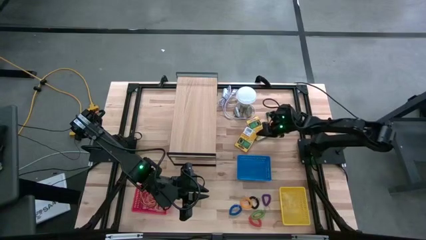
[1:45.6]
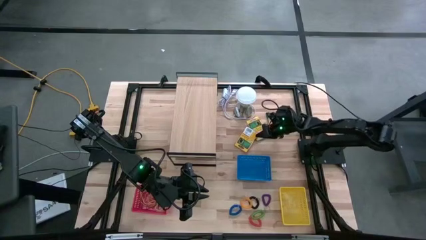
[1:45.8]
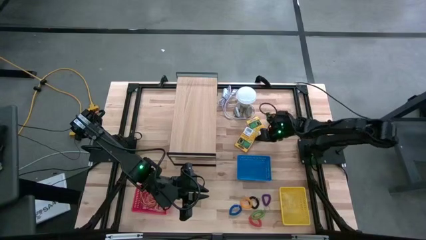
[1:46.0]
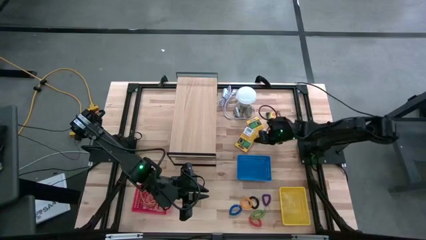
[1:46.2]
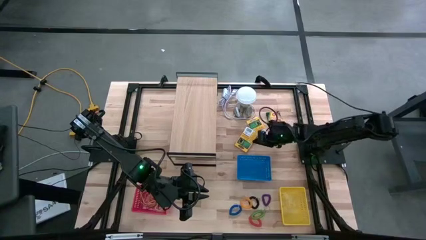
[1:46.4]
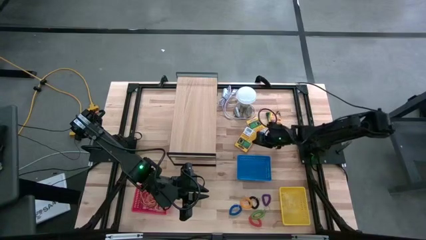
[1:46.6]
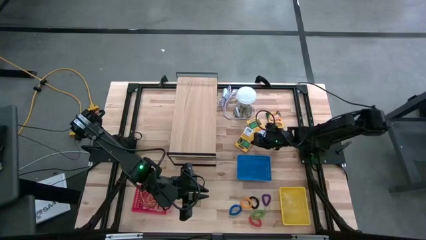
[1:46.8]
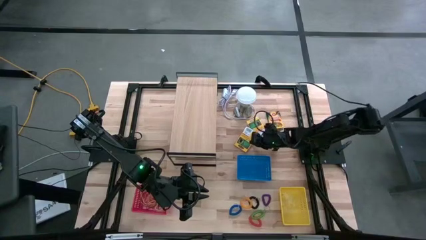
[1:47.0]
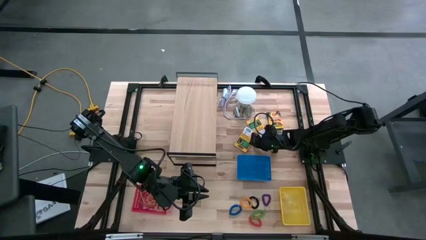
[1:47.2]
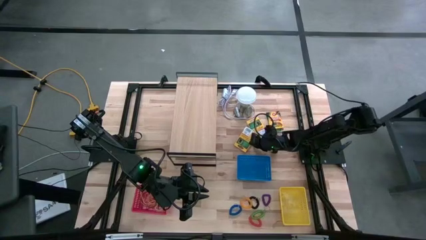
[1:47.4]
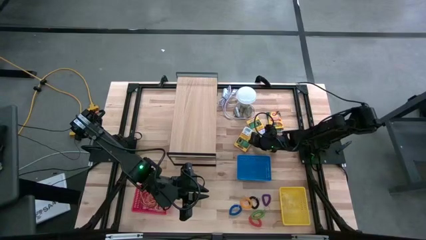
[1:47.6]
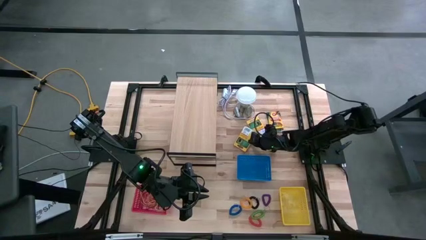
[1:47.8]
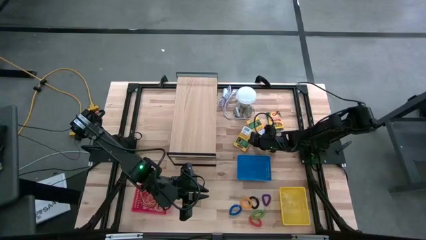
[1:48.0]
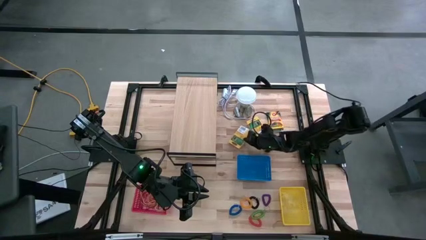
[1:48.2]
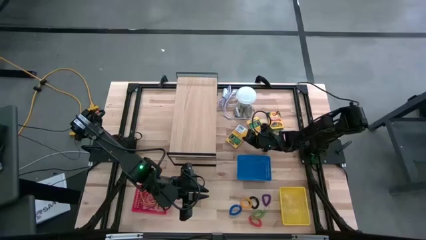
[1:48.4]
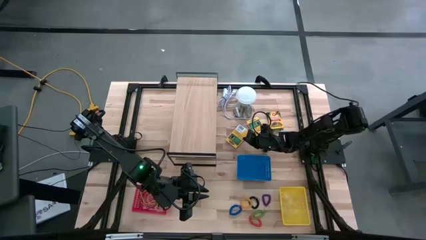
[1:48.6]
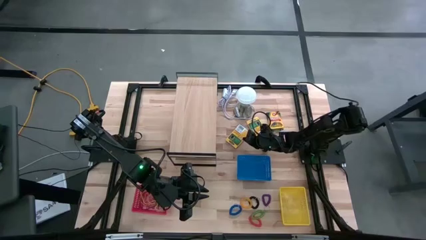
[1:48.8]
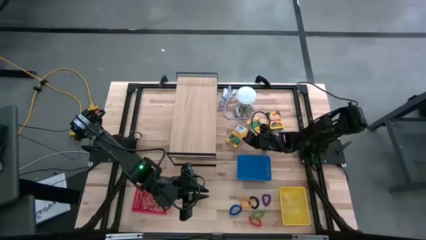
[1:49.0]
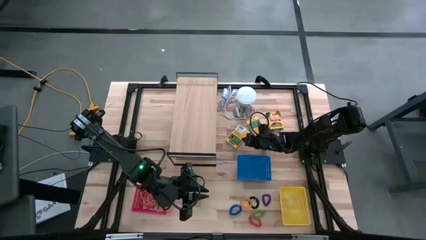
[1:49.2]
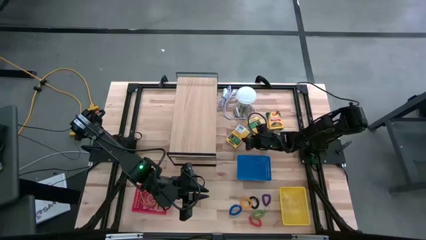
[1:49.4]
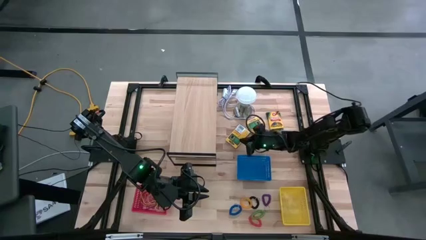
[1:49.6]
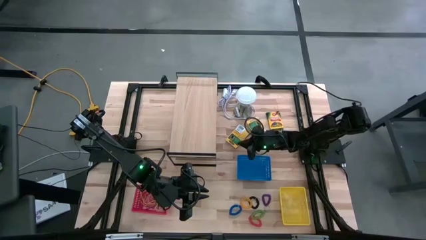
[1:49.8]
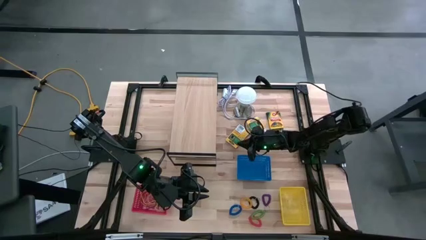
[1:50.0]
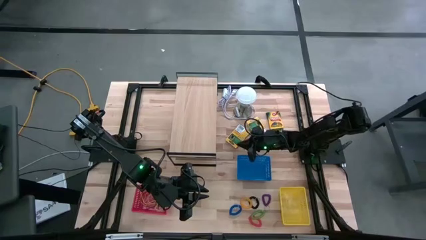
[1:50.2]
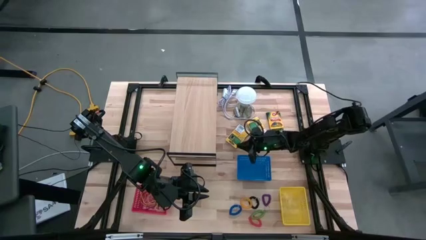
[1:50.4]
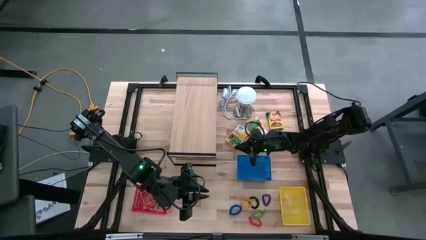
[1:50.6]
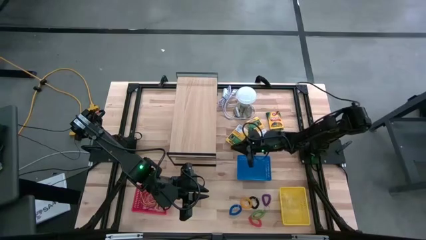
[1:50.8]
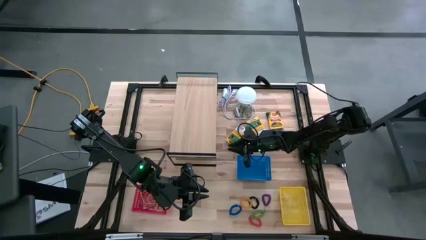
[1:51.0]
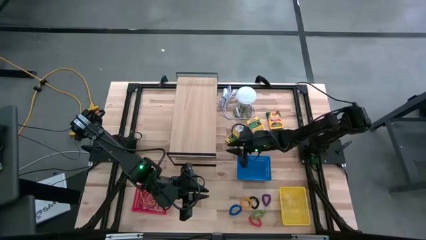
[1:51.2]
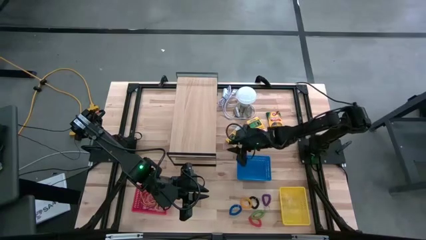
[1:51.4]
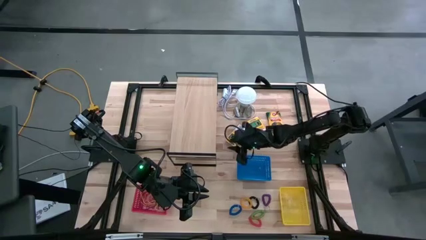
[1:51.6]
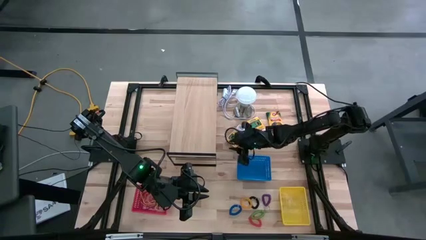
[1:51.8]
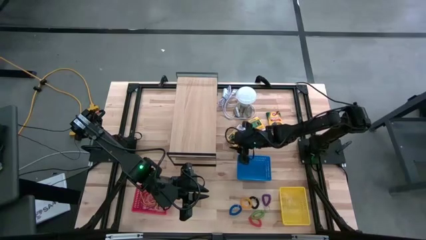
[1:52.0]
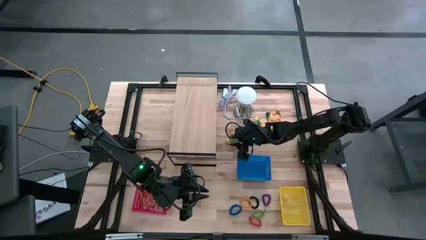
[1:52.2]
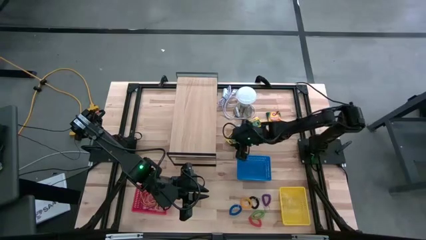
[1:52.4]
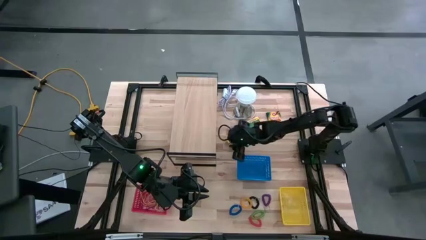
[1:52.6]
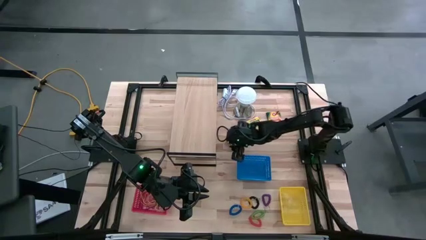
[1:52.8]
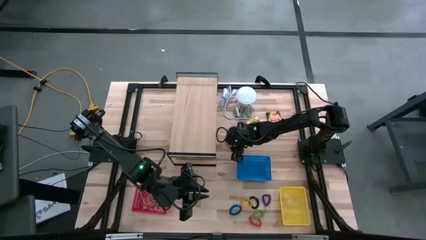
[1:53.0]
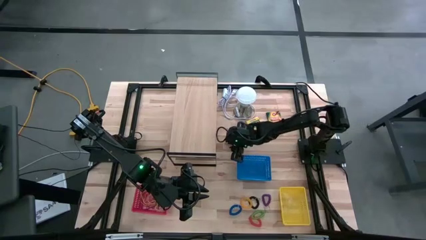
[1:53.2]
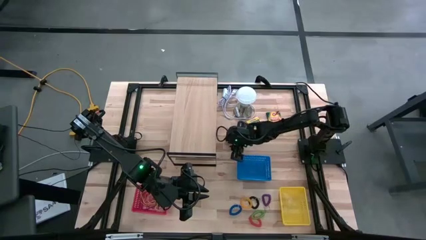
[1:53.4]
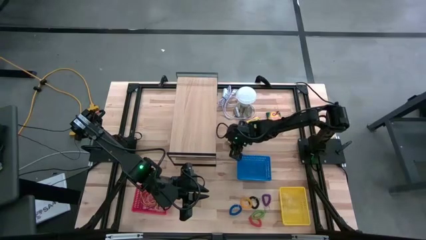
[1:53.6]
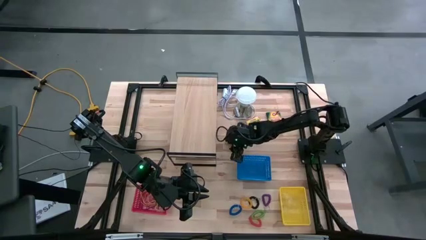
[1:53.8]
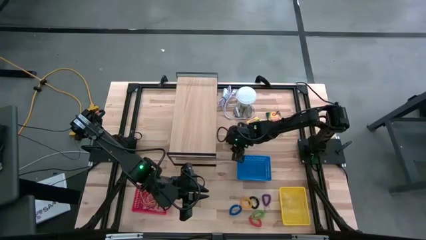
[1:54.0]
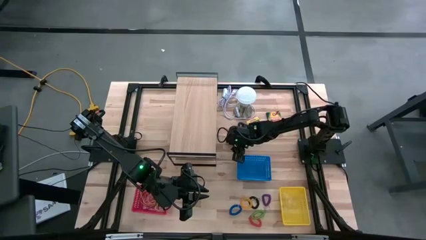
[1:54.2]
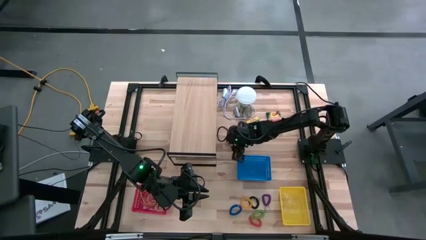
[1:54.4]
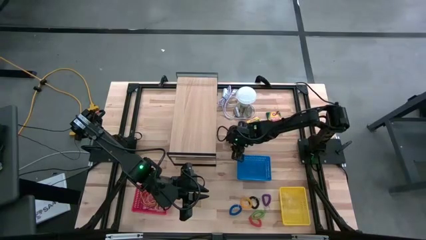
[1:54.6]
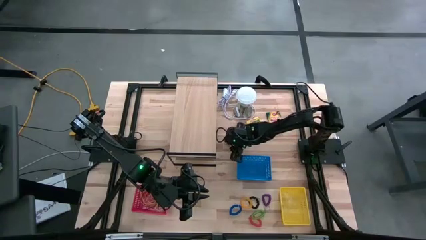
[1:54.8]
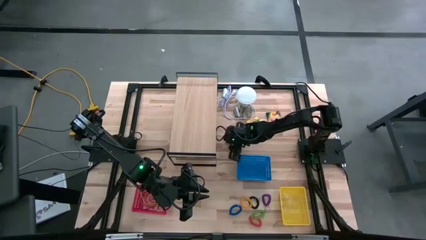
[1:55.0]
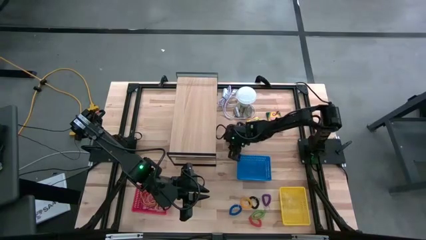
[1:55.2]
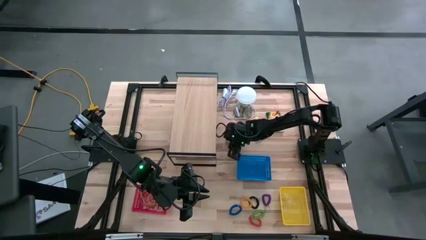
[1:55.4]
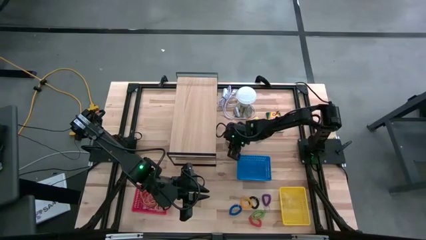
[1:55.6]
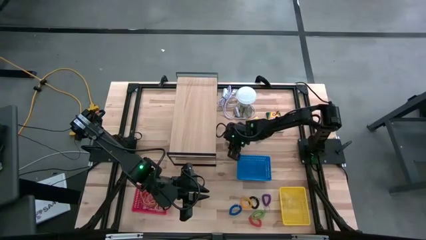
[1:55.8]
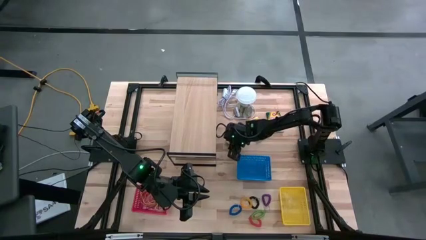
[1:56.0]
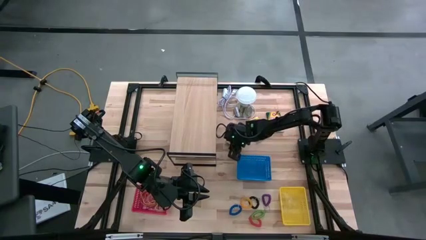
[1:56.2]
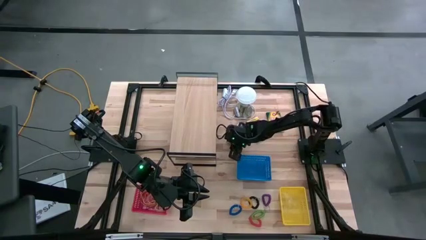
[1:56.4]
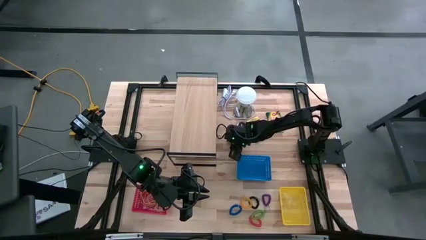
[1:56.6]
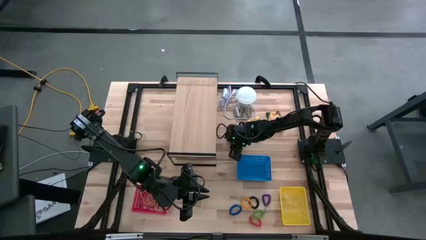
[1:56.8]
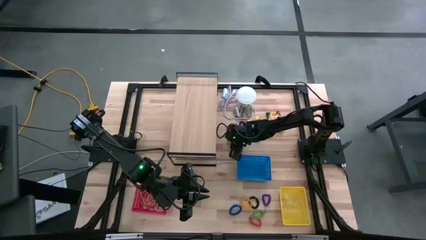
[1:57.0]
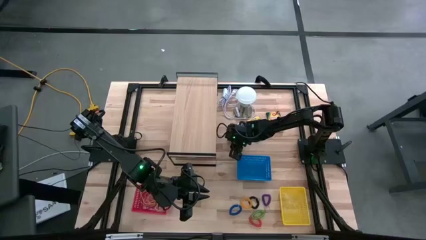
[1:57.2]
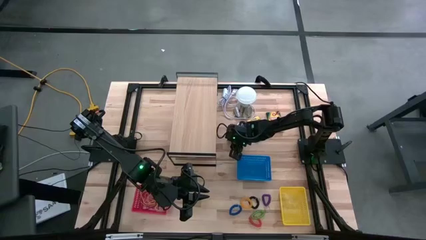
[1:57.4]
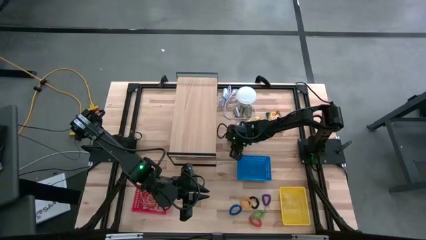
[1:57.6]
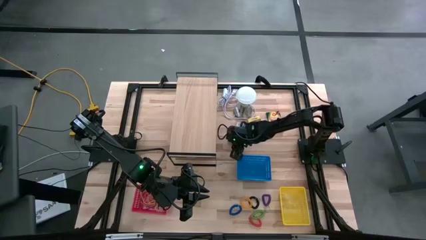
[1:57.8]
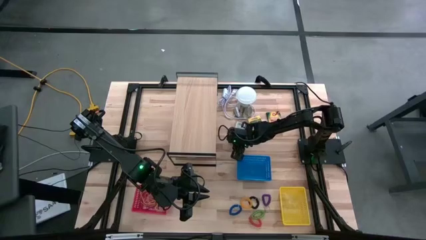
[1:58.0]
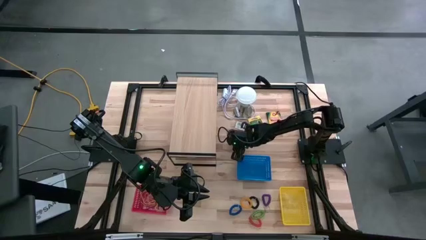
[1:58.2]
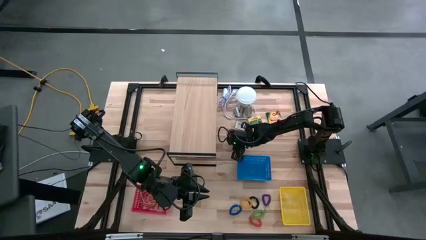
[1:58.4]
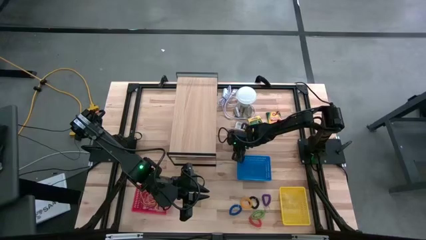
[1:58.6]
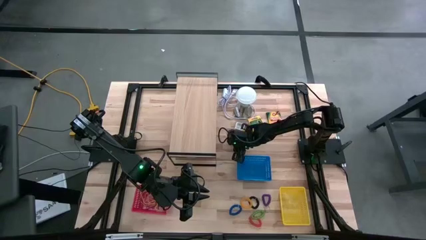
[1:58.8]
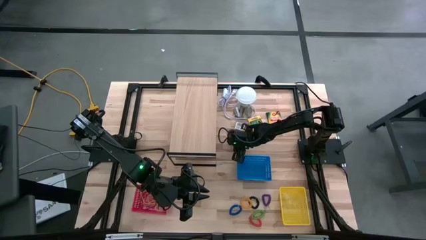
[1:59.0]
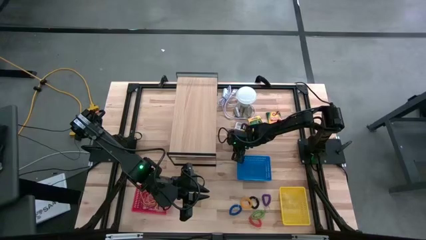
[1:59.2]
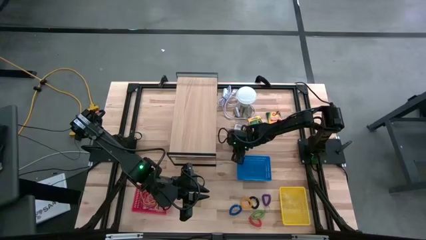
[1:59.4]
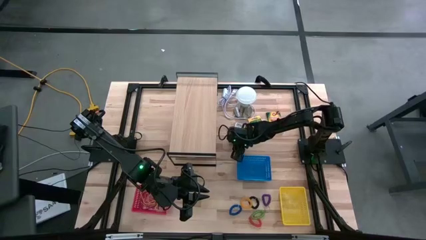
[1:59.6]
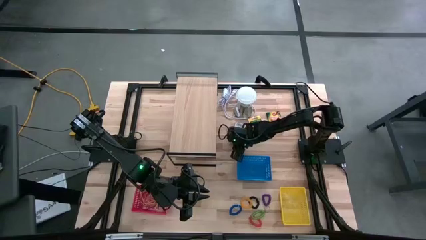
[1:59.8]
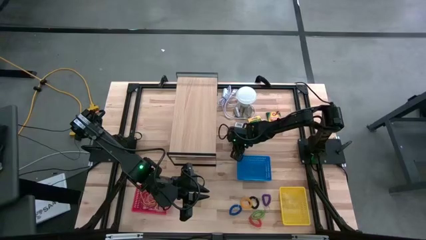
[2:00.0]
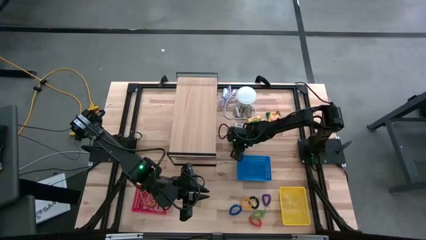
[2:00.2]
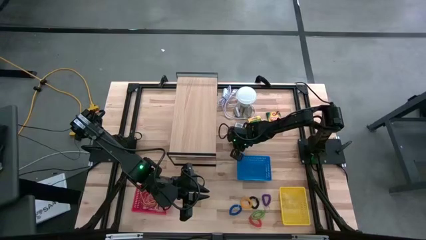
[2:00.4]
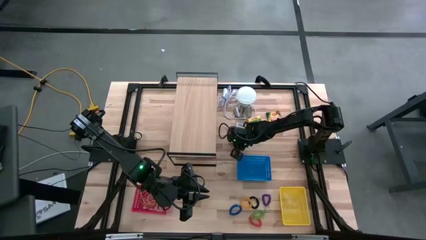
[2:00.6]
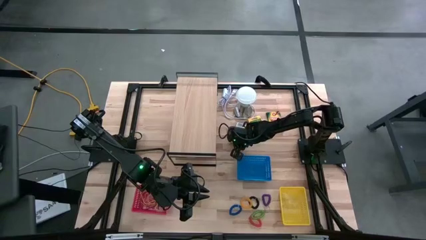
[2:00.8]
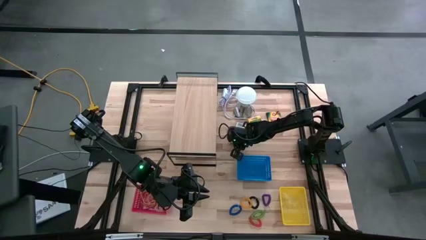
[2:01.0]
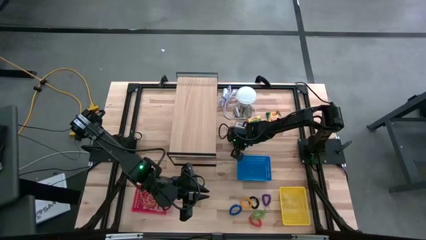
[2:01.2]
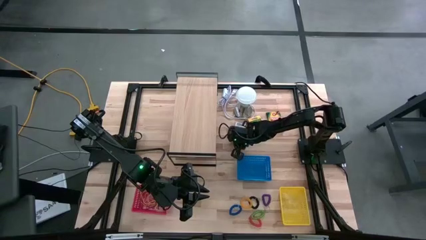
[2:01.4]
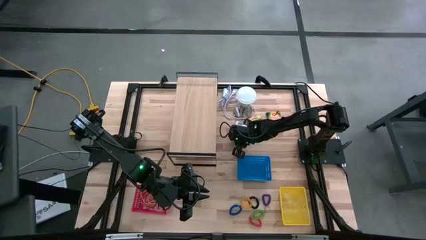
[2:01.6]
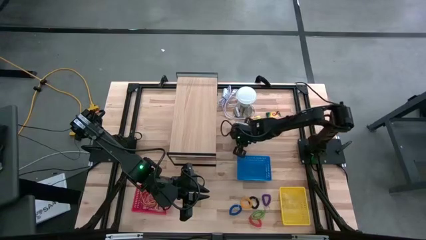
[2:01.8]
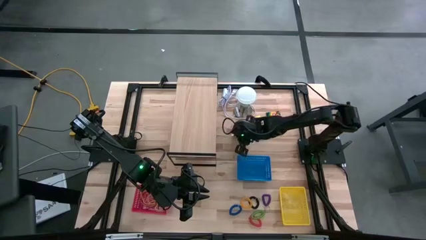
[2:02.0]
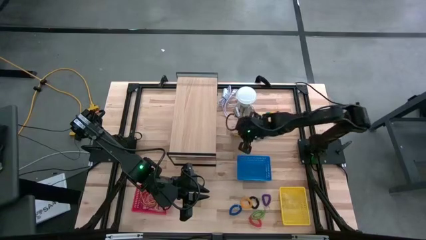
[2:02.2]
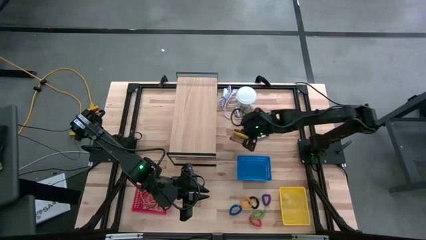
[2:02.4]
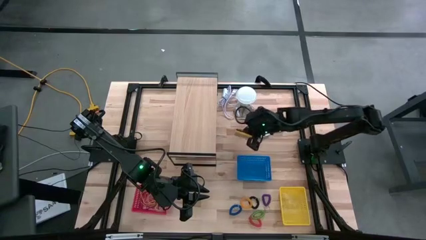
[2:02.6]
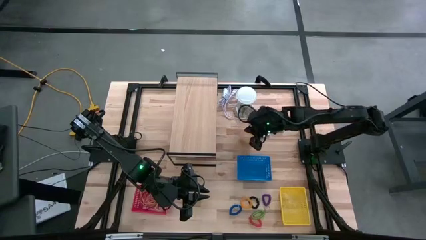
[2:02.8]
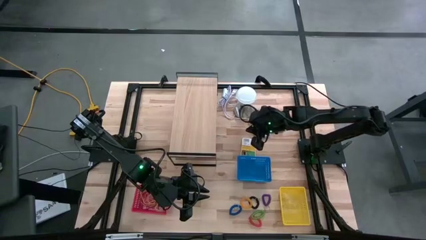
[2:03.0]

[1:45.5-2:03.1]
Task: Pick & Place Office Desk Supplies
Put the bottom yellow crayon box into the blue bin
